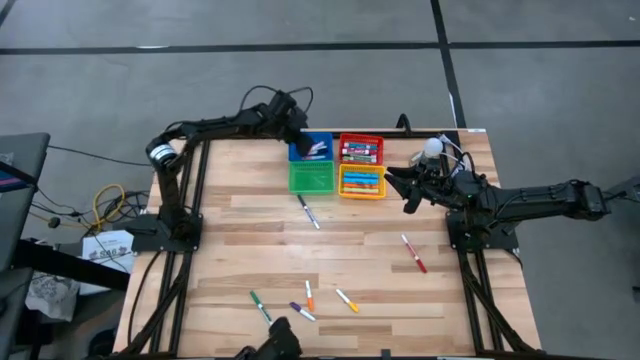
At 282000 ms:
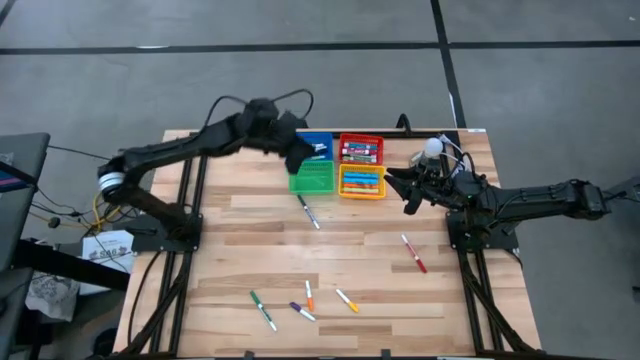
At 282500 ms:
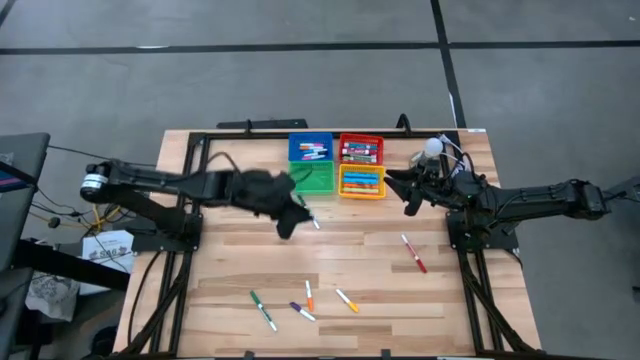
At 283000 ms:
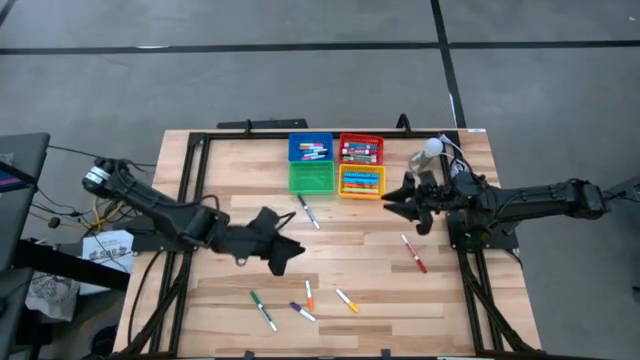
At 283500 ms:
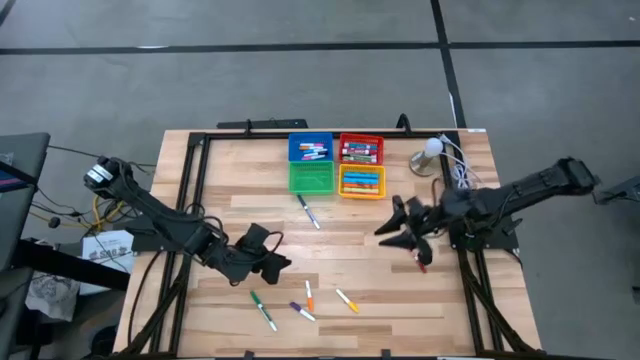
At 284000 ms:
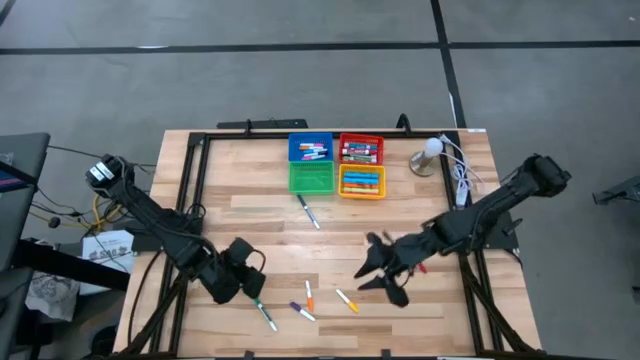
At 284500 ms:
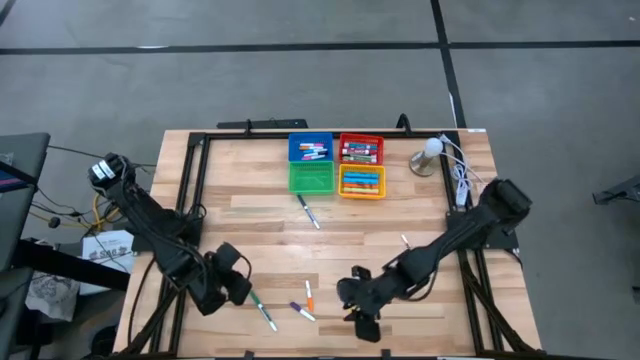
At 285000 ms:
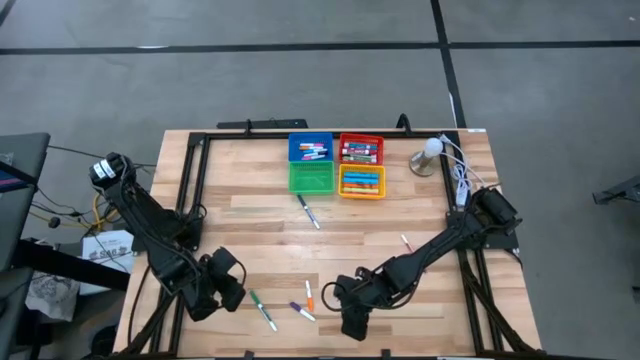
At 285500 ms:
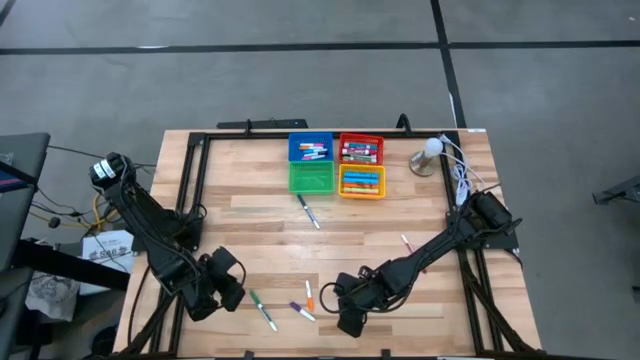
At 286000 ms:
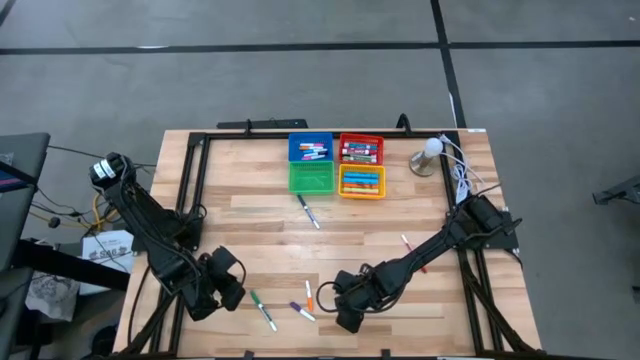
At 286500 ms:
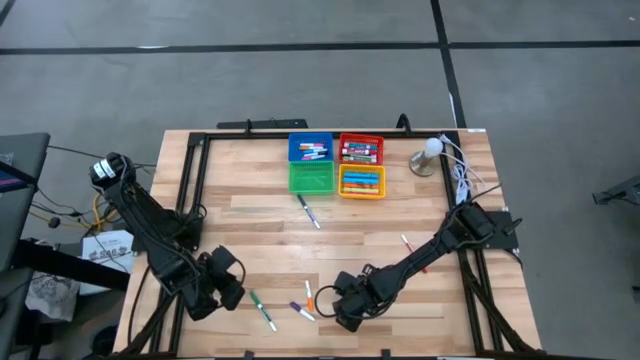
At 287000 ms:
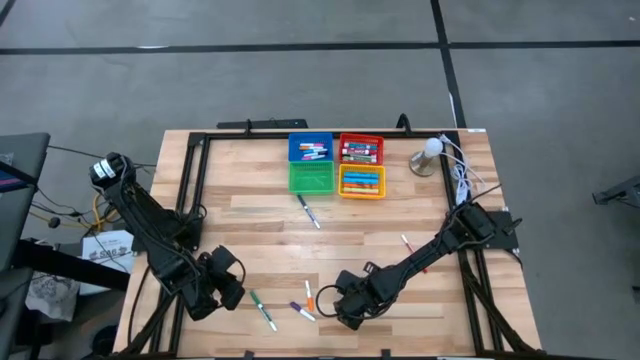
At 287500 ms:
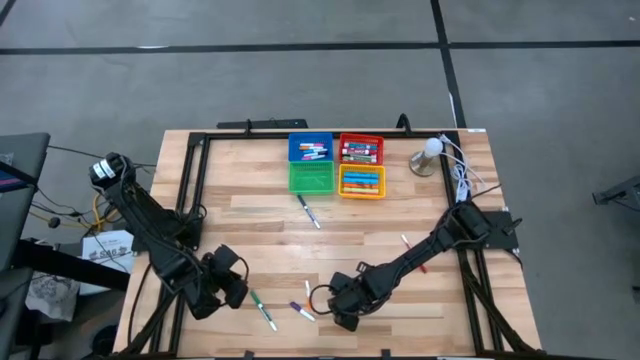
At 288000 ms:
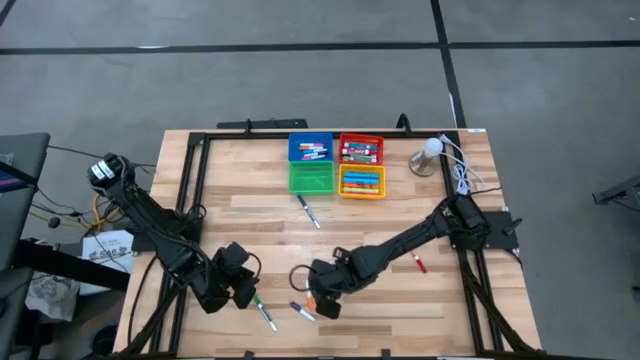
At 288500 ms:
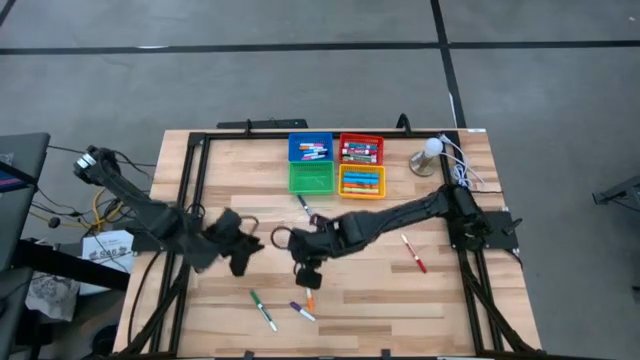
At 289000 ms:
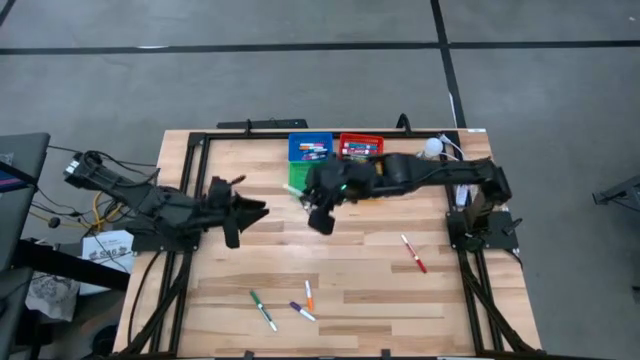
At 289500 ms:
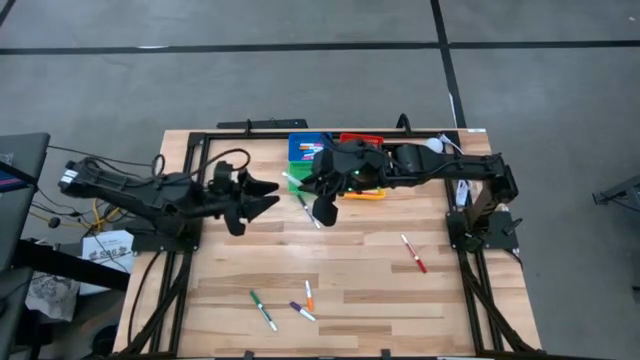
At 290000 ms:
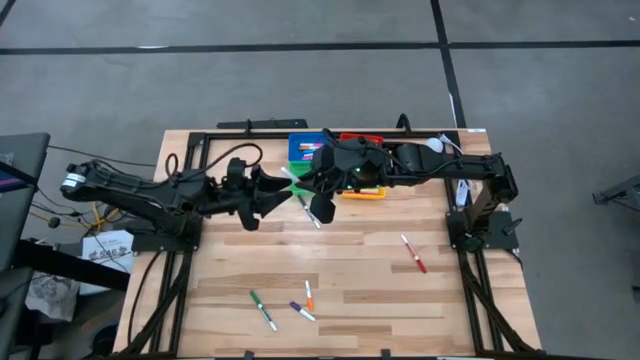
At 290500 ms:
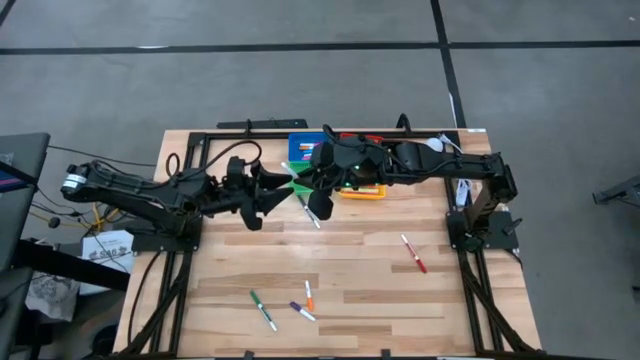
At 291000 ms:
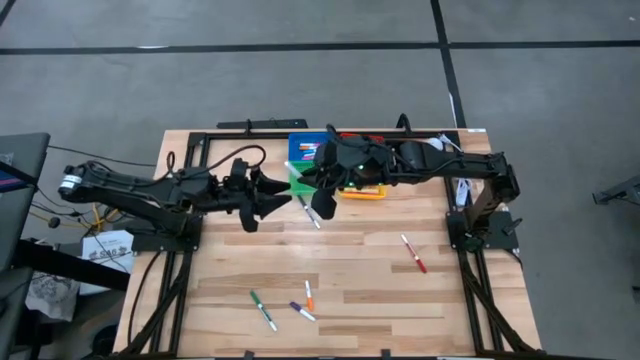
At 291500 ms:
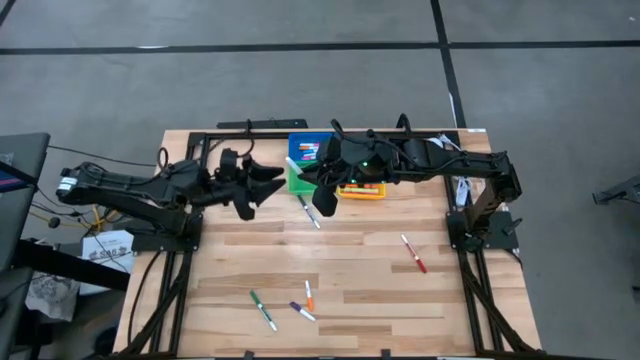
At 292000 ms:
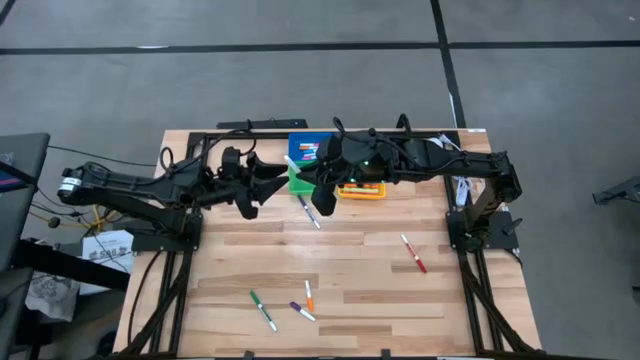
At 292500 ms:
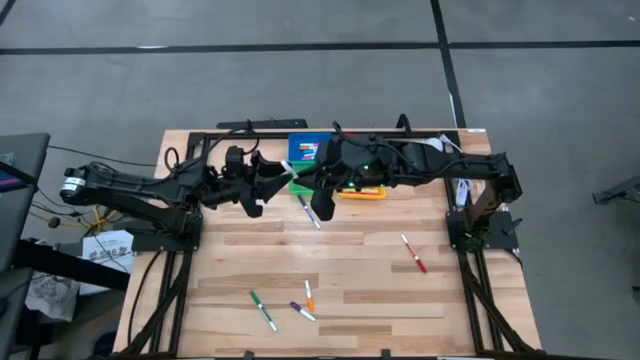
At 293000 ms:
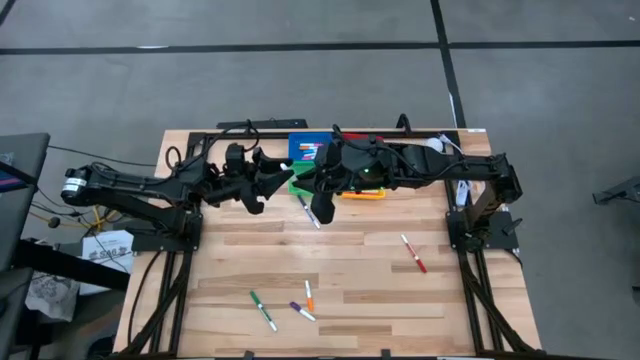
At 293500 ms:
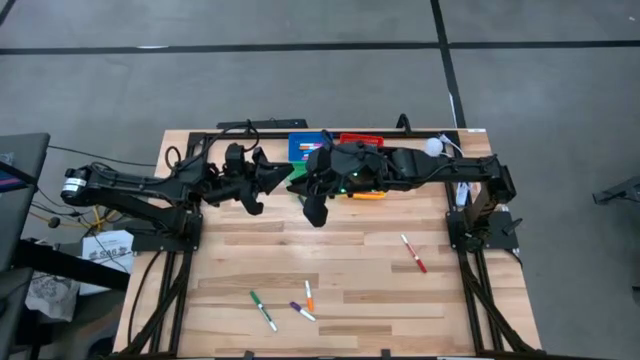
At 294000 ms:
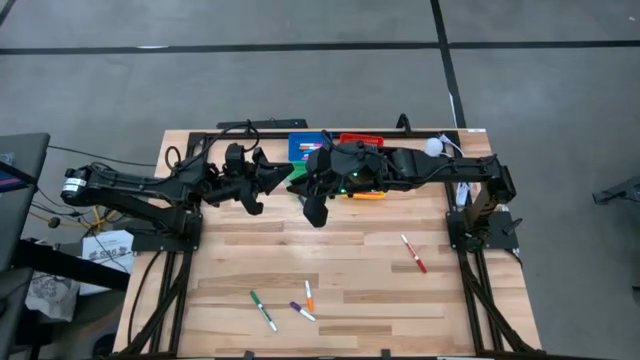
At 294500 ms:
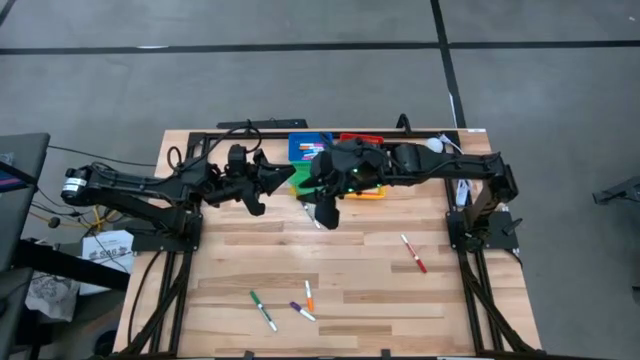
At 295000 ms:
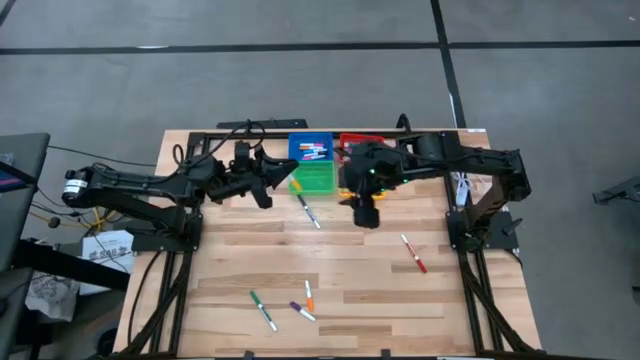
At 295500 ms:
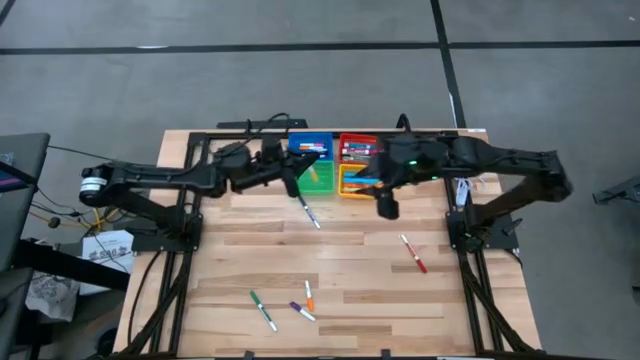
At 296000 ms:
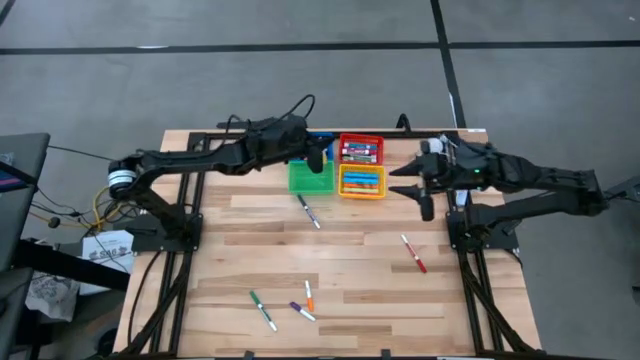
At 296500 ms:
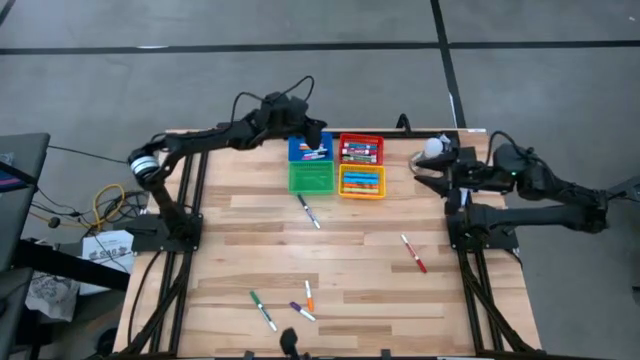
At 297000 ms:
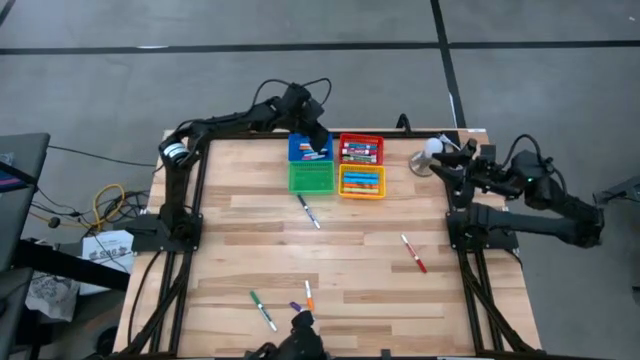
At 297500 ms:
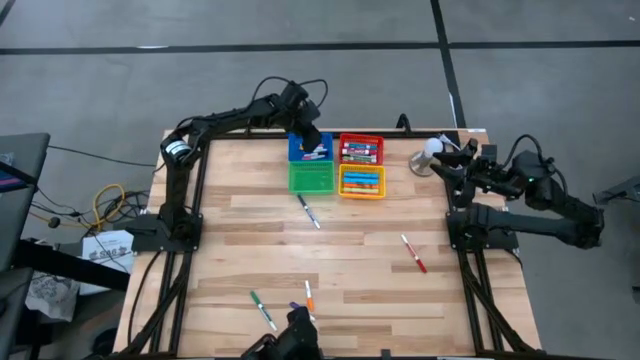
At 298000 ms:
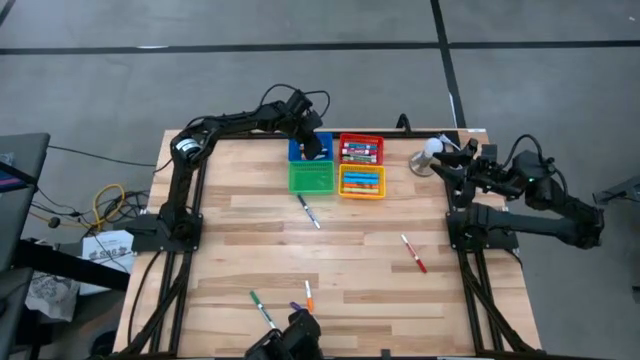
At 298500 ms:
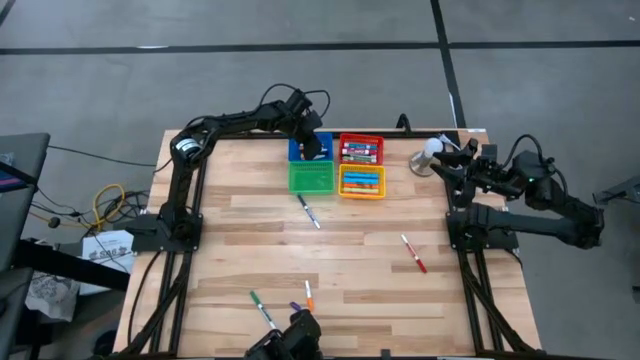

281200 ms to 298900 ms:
Task: Pick & Place Markers
Put the yellow pen into the blue bin
